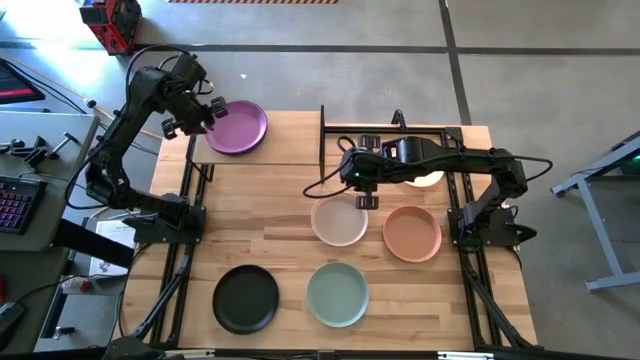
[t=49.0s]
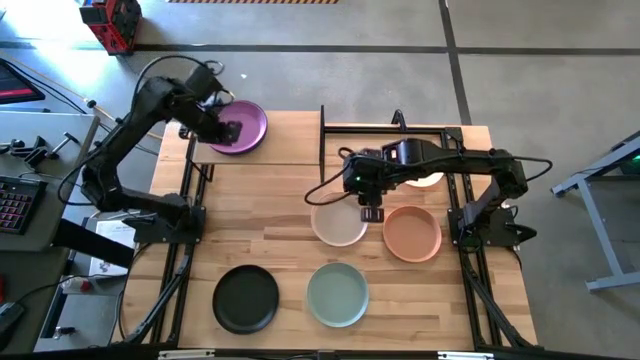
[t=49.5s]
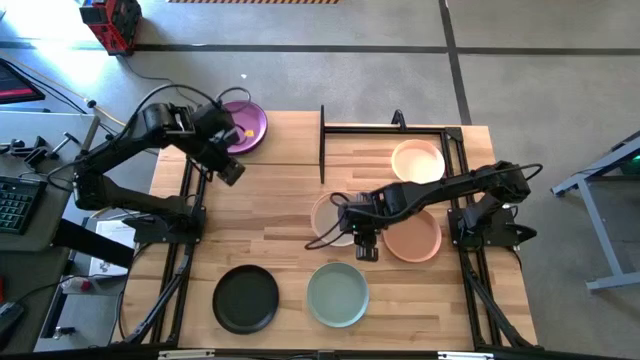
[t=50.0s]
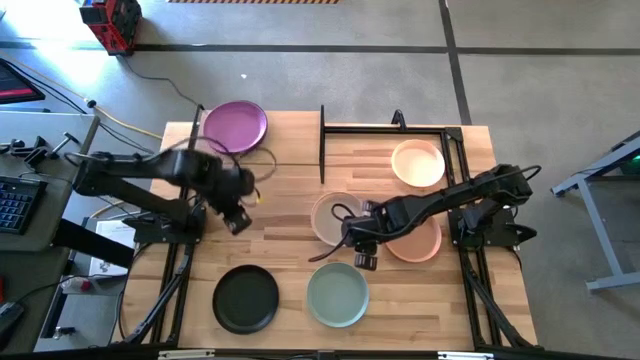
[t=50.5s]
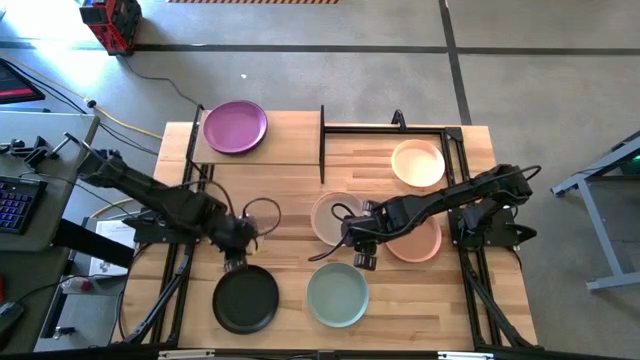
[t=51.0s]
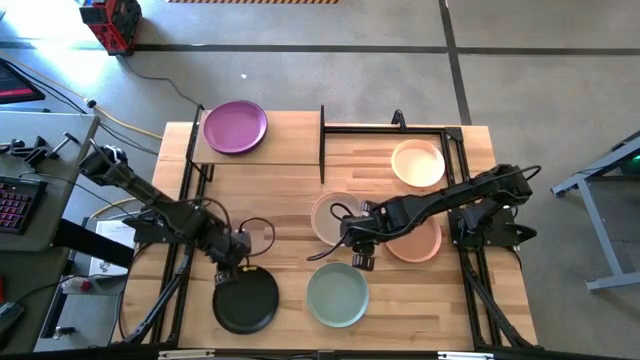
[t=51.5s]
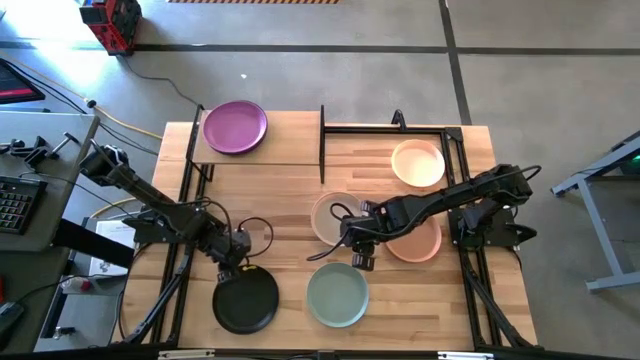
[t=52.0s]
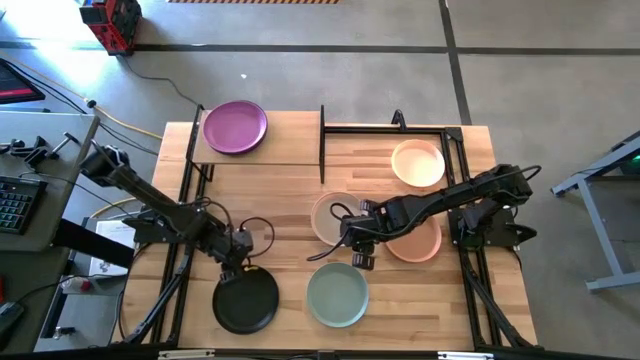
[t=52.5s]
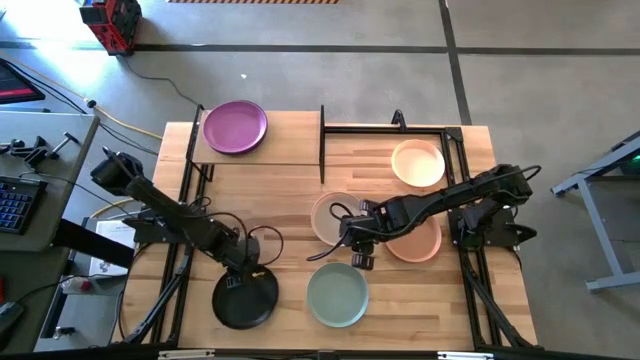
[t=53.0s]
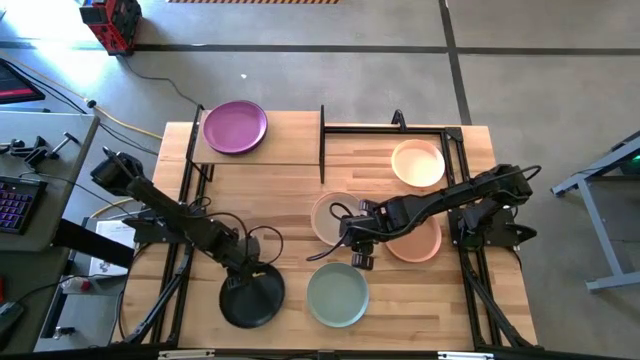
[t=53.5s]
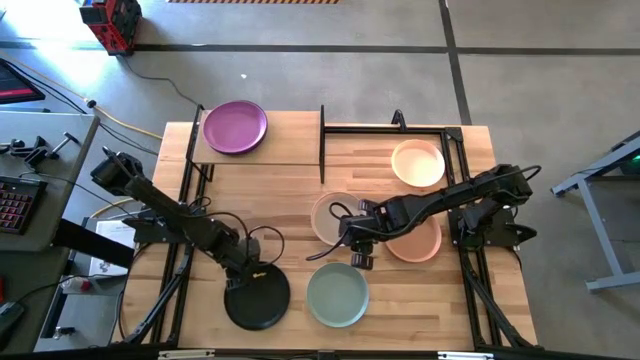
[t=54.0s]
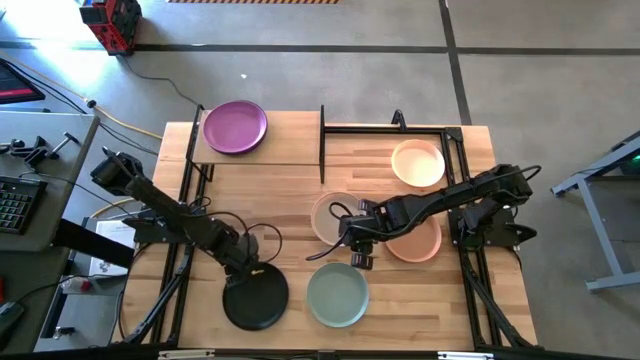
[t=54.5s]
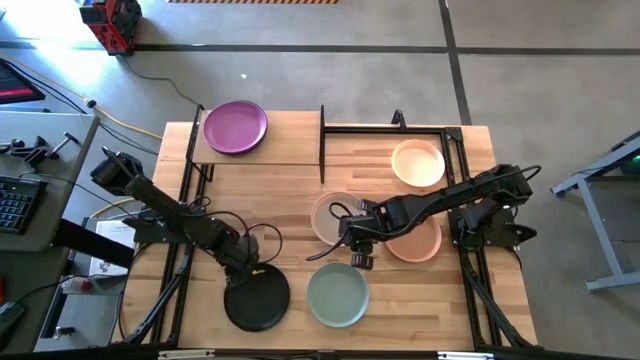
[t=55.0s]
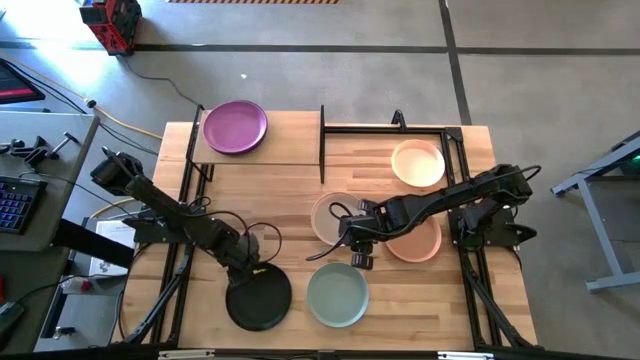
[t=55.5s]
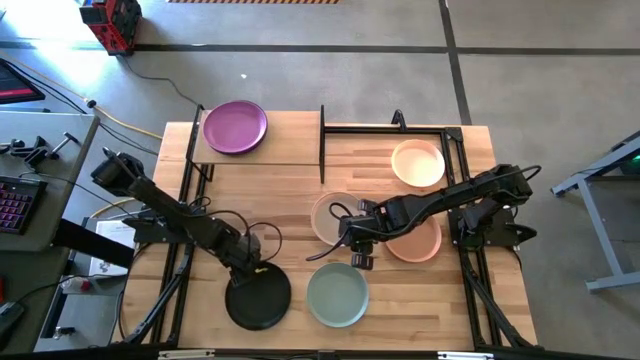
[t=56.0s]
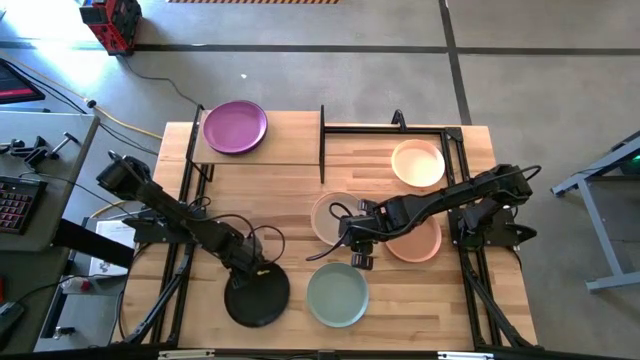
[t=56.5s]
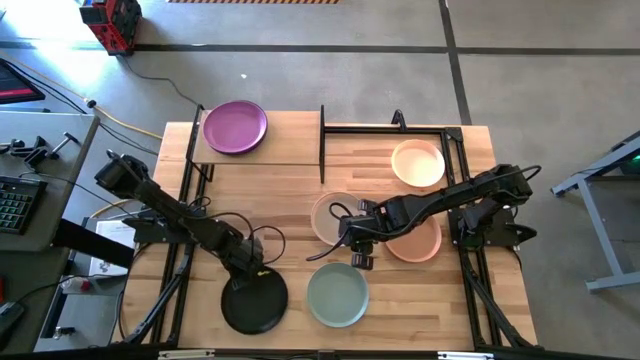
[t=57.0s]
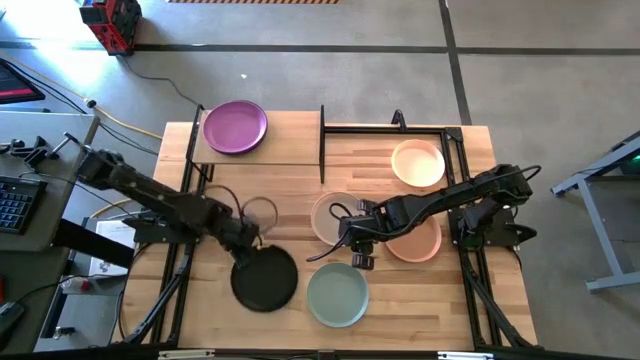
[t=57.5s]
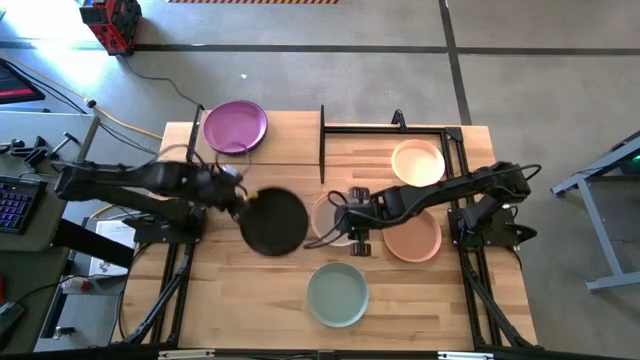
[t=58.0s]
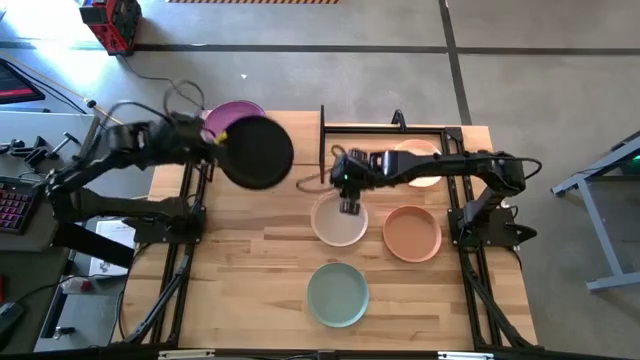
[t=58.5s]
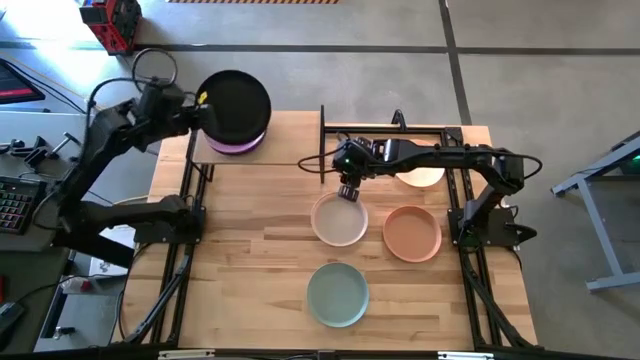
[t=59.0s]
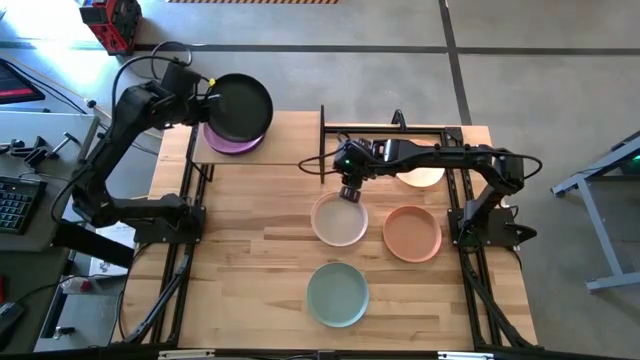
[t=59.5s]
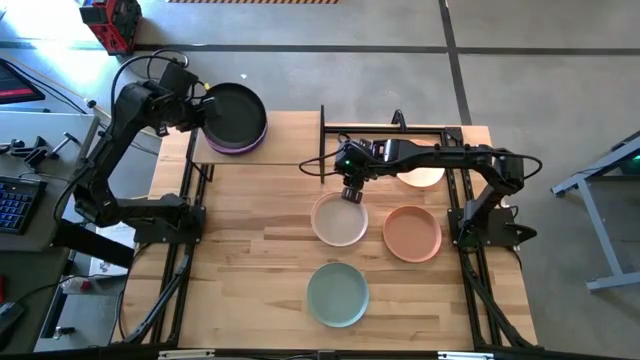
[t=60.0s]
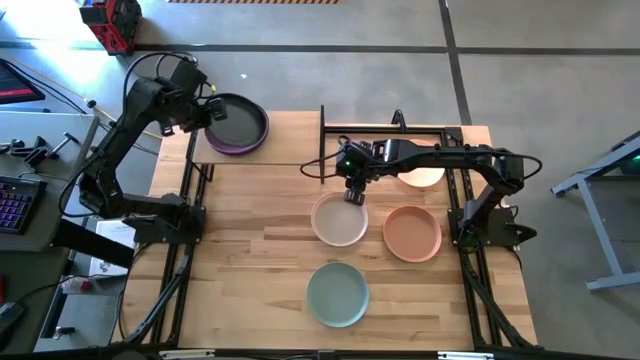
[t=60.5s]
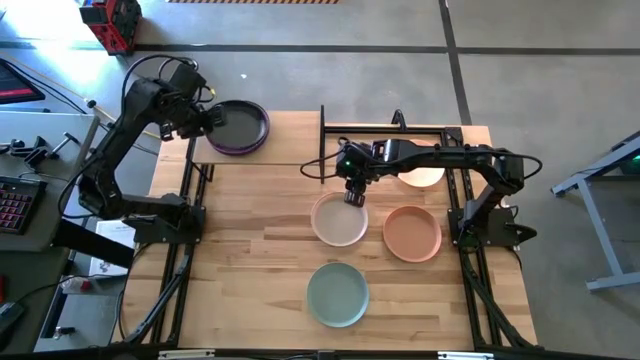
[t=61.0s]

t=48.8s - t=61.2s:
Task: Place and stack plates onto a shelf
Stack the black plate on top of the violet plate on the shelf

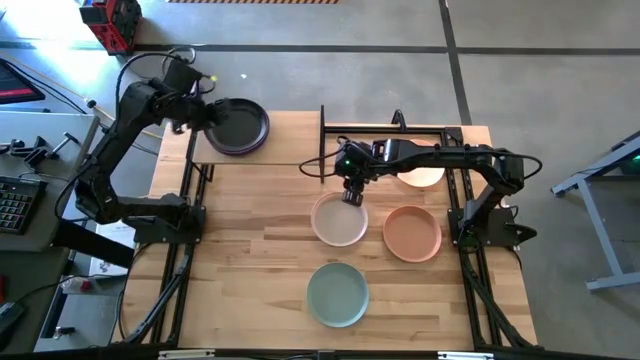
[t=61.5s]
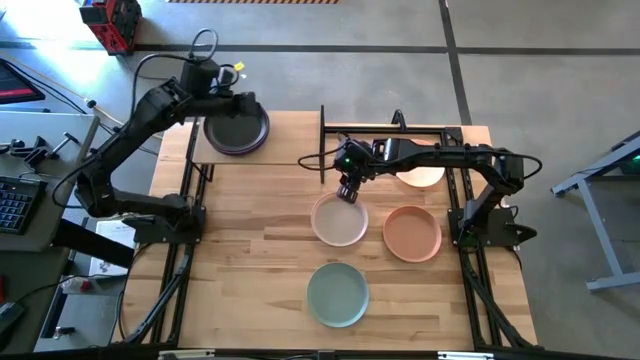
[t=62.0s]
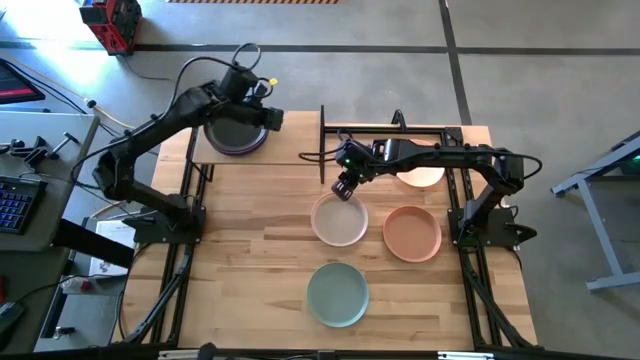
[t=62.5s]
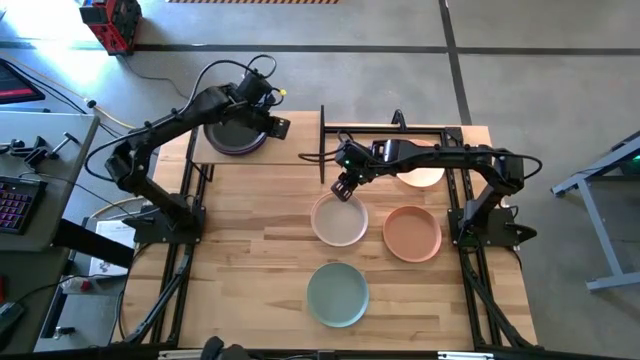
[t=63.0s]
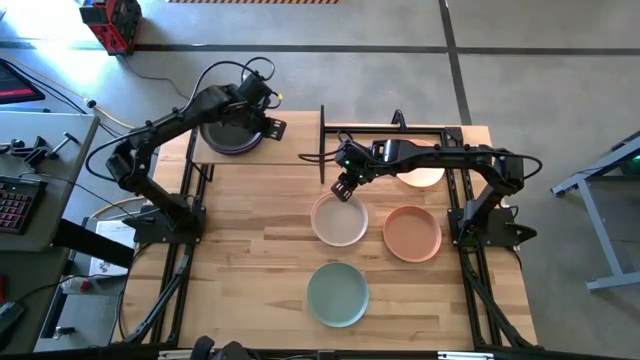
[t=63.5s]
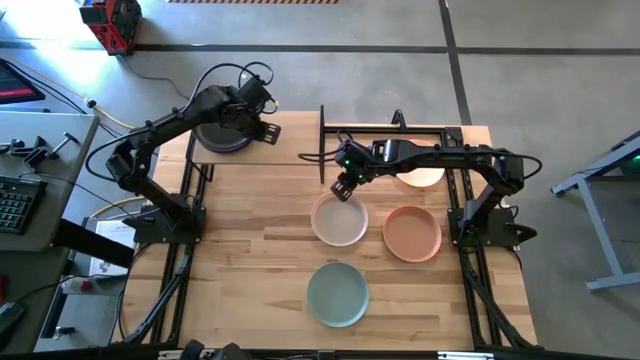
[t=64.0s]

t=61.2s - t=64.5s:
Adjust the nested plates on the shelf

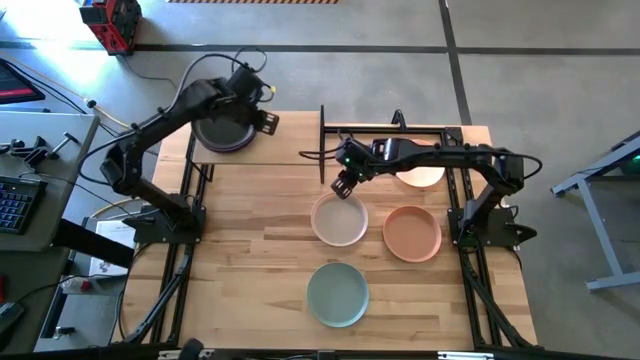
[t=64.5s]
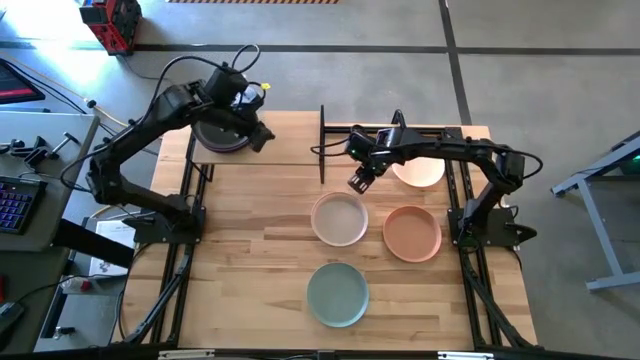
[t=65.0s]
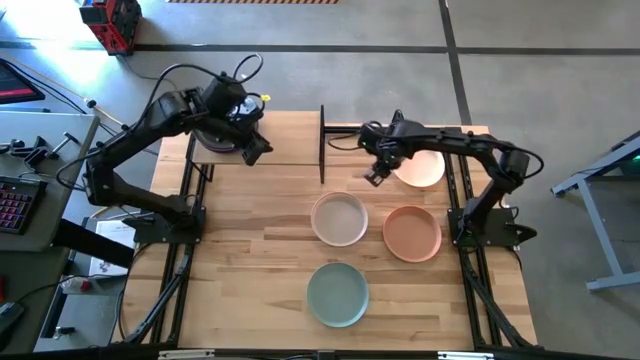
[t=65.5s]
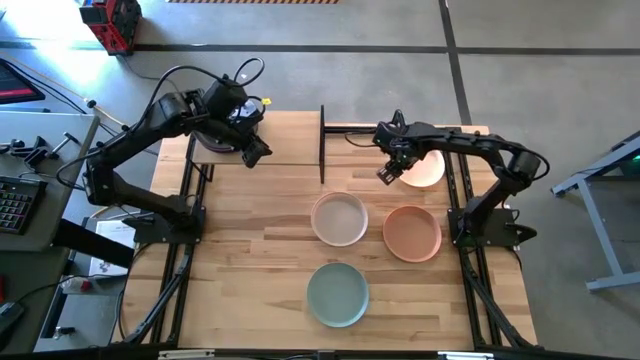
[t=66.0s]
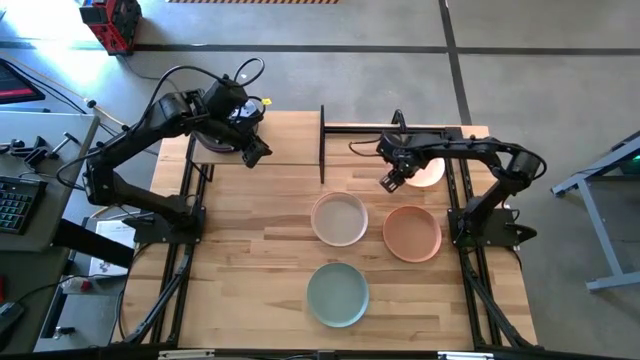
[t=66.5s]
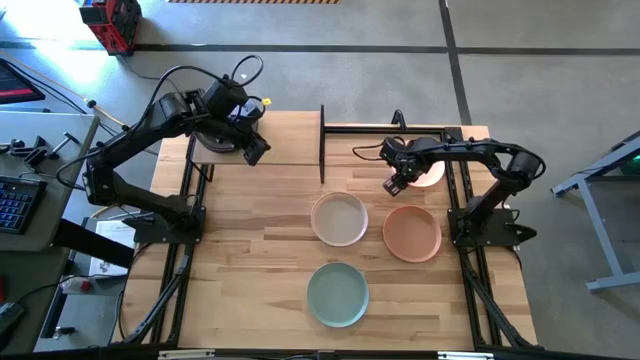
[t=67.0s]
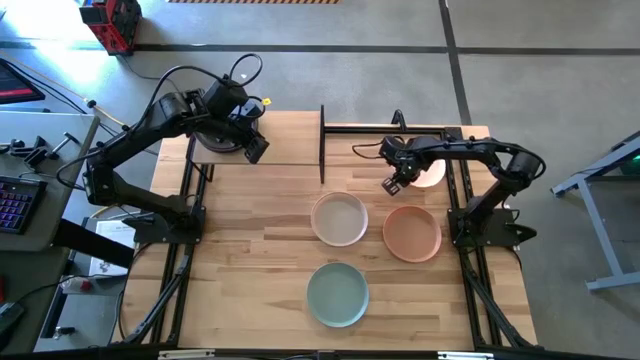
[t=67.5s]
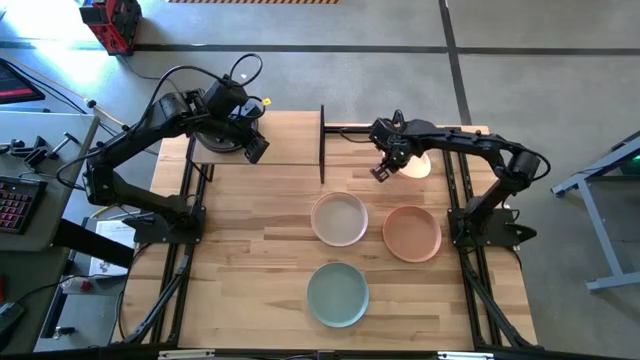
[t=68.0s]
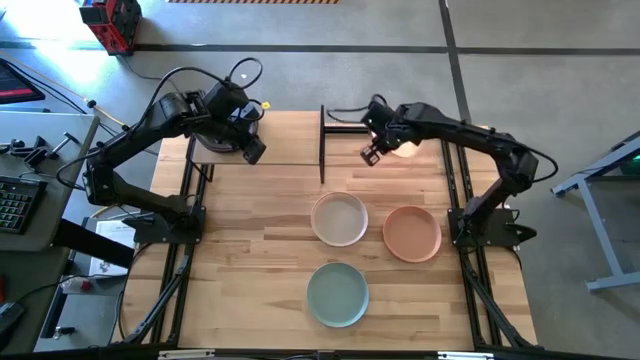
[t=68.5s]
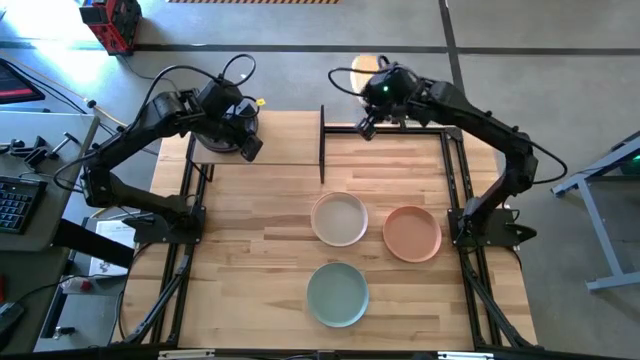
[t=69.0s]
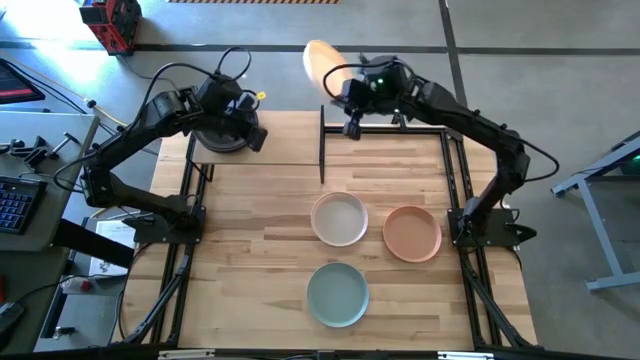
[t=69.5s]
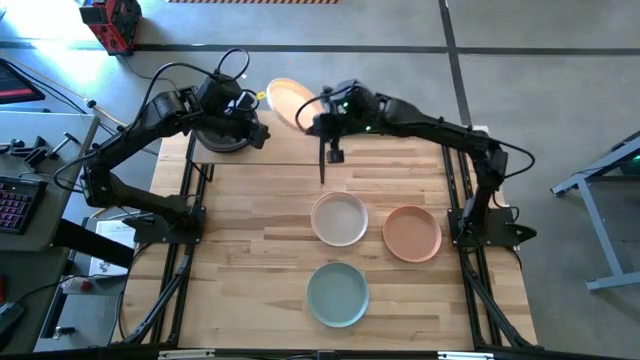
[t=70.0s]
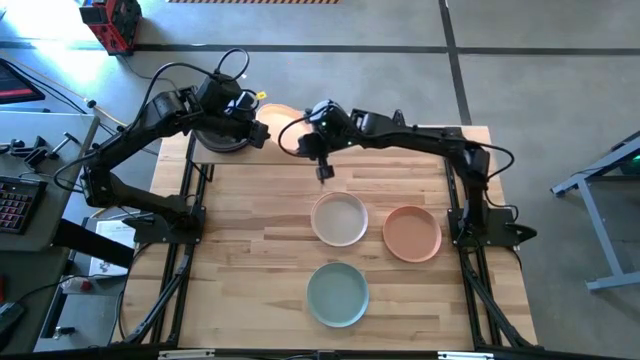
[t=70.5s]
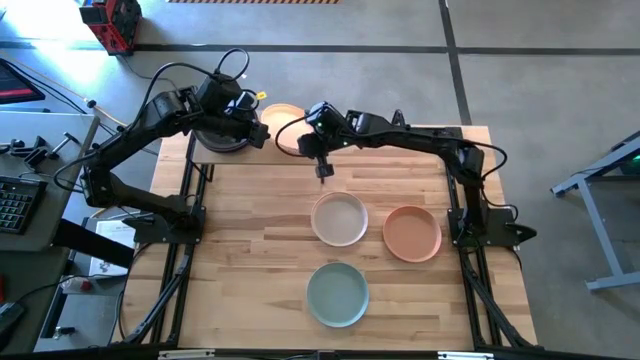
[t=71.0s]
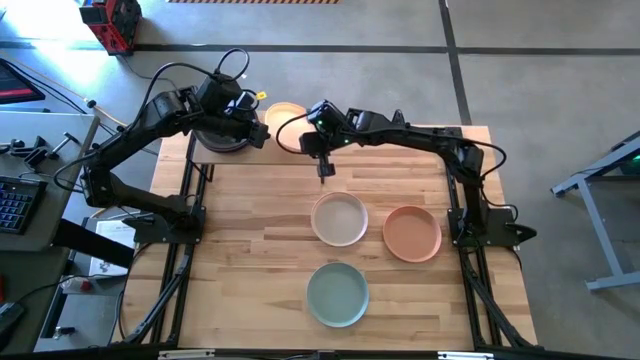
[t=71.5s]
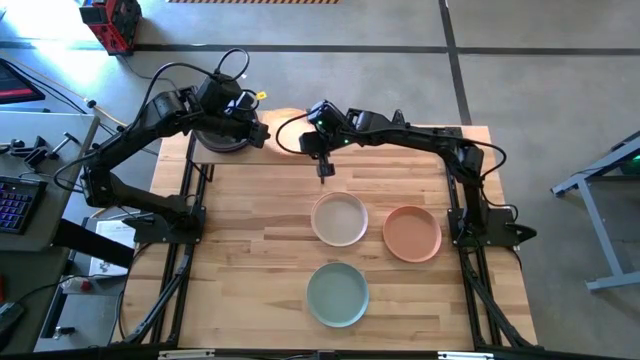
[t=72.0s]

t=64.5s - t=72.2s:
Put the top white plate on the shelf
